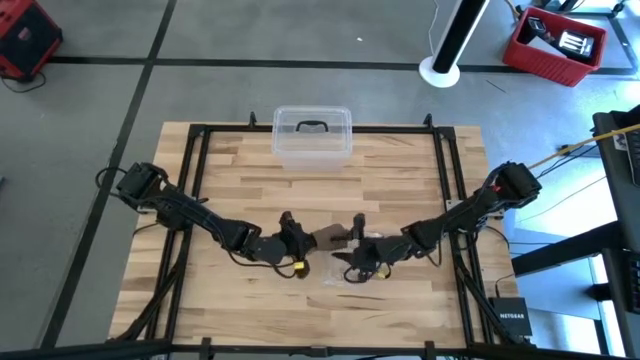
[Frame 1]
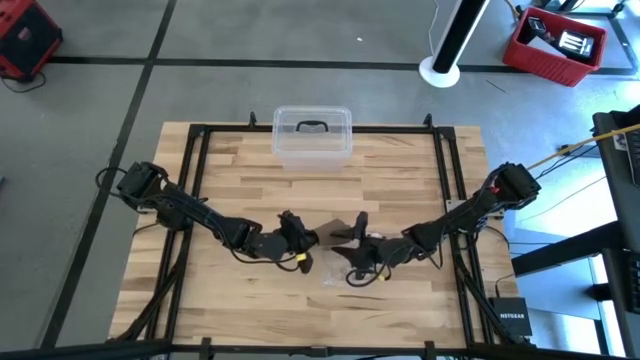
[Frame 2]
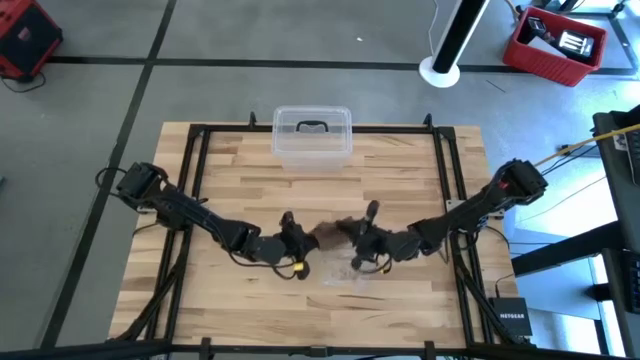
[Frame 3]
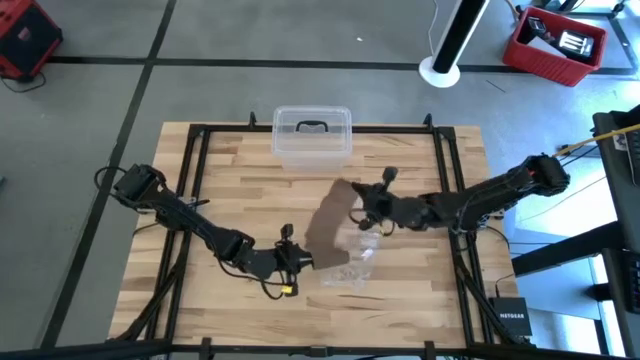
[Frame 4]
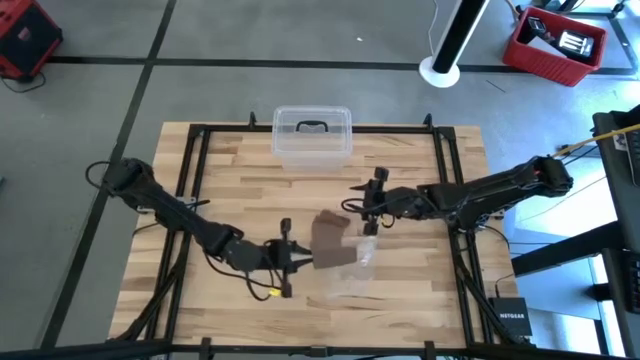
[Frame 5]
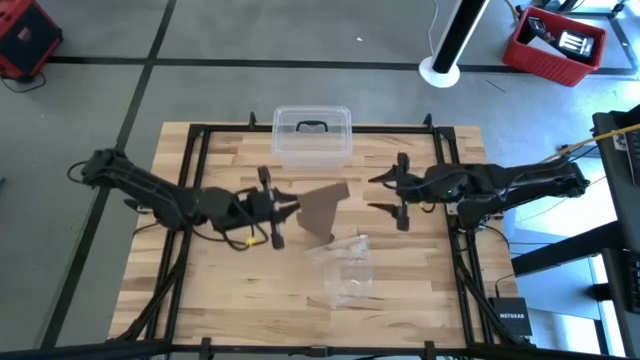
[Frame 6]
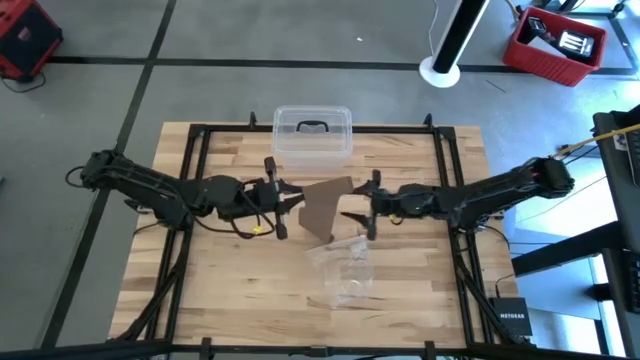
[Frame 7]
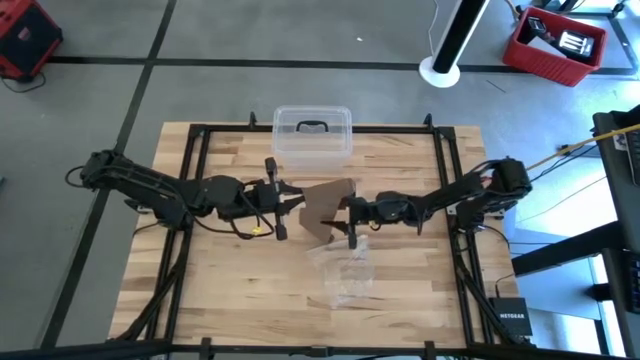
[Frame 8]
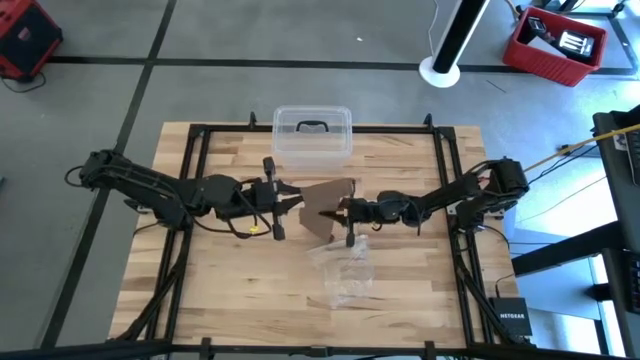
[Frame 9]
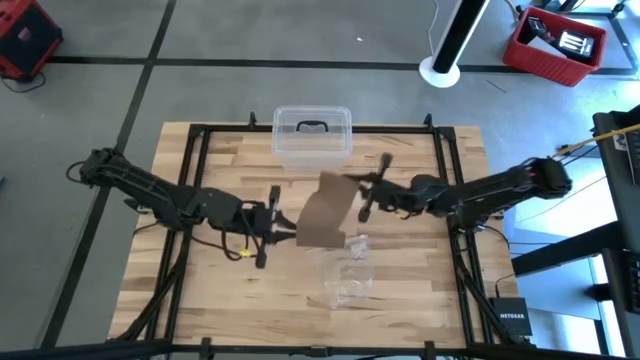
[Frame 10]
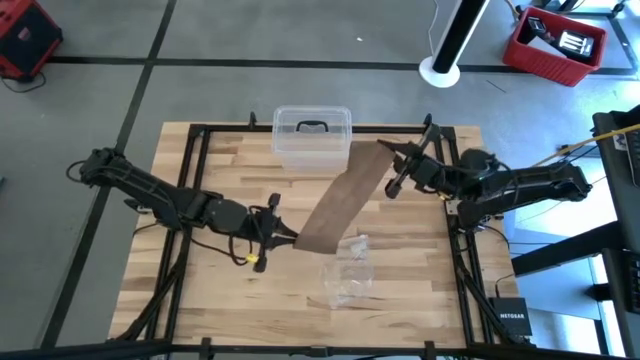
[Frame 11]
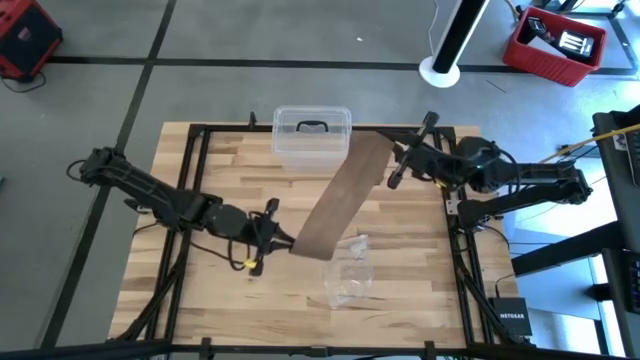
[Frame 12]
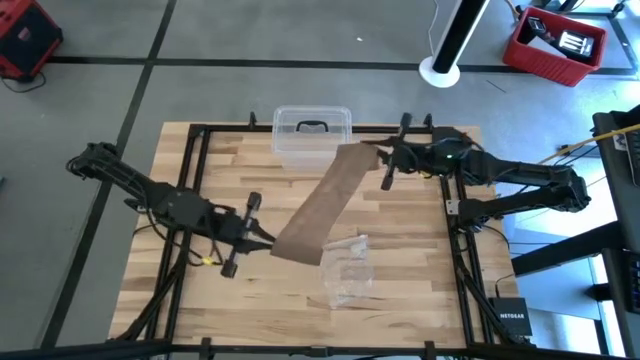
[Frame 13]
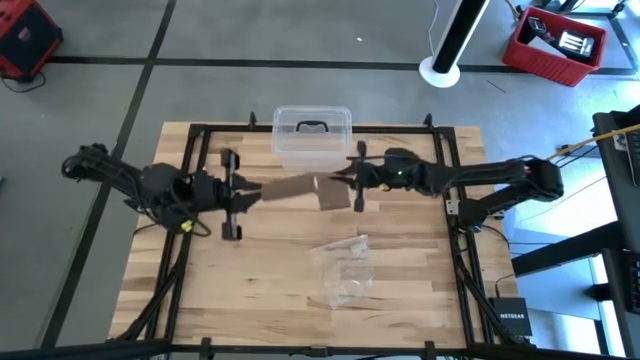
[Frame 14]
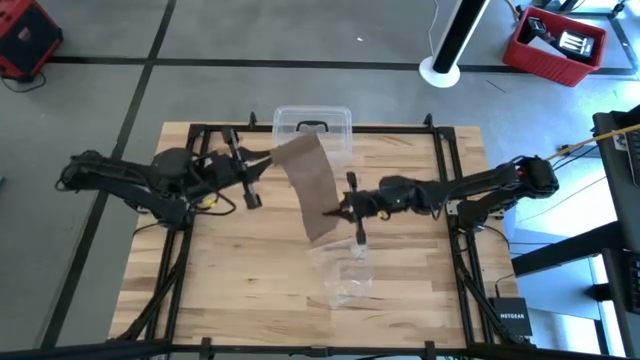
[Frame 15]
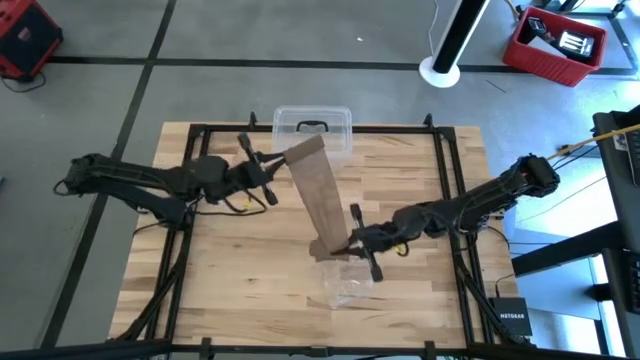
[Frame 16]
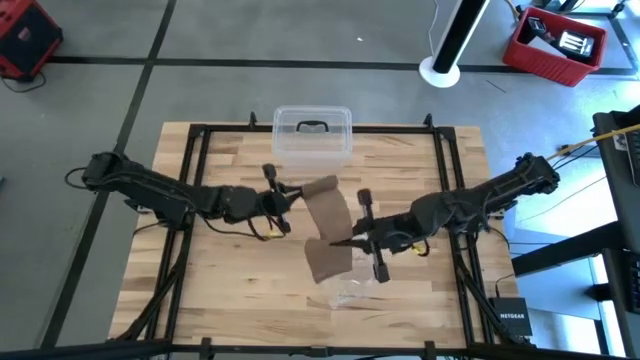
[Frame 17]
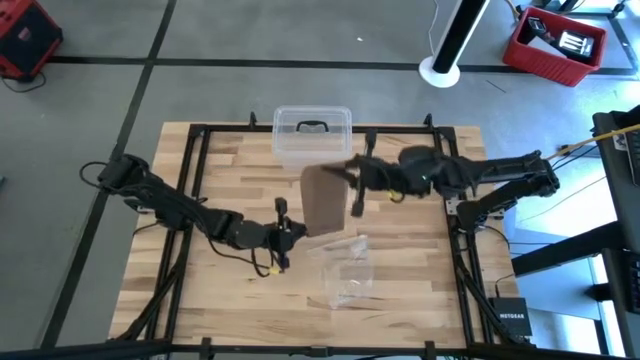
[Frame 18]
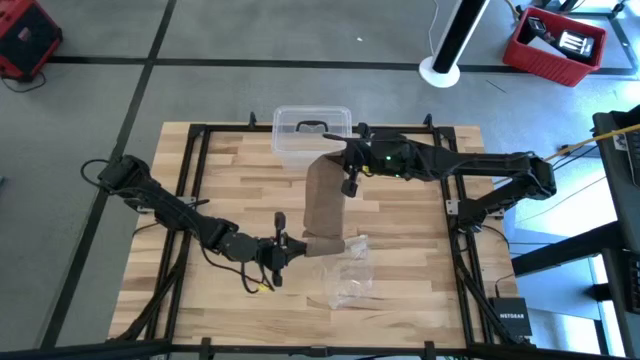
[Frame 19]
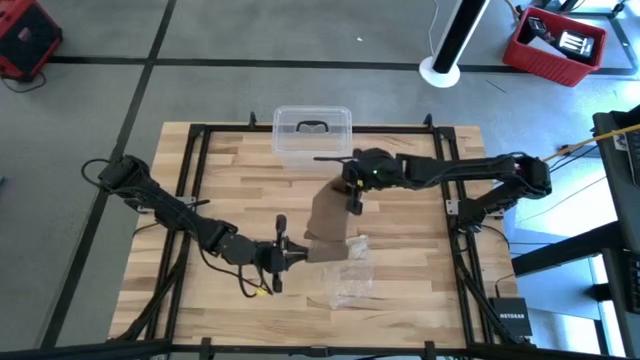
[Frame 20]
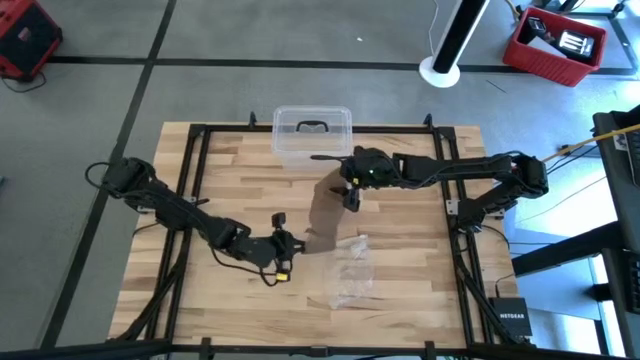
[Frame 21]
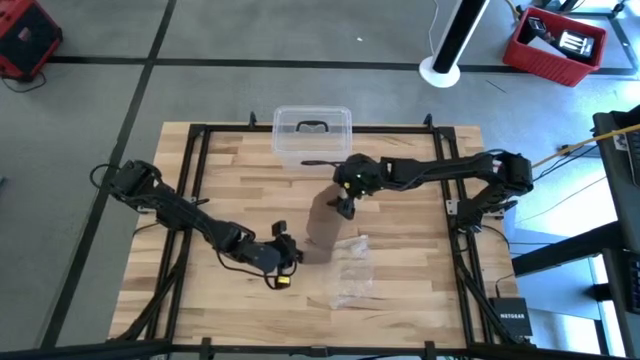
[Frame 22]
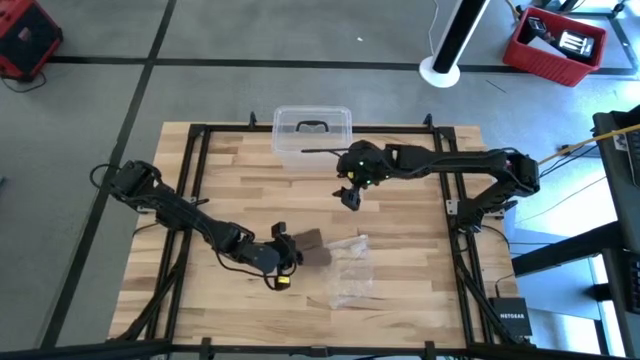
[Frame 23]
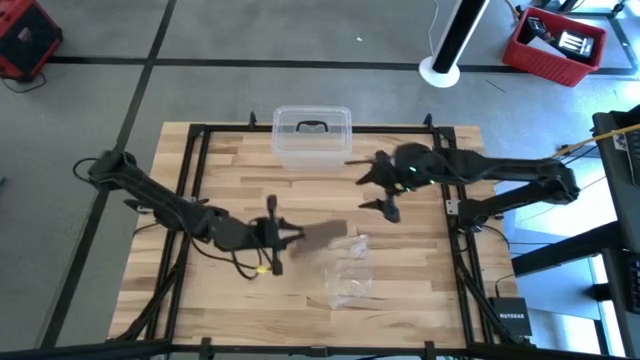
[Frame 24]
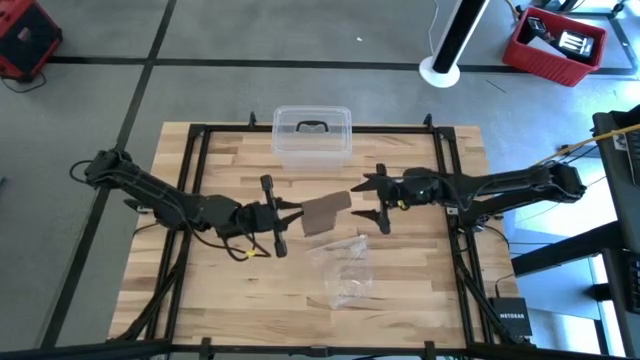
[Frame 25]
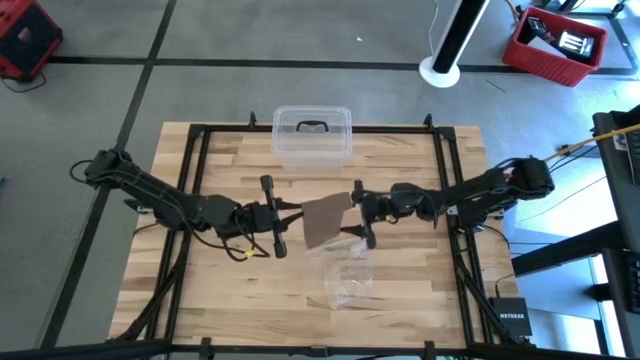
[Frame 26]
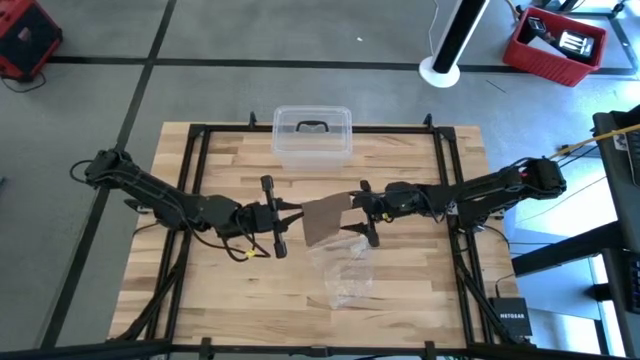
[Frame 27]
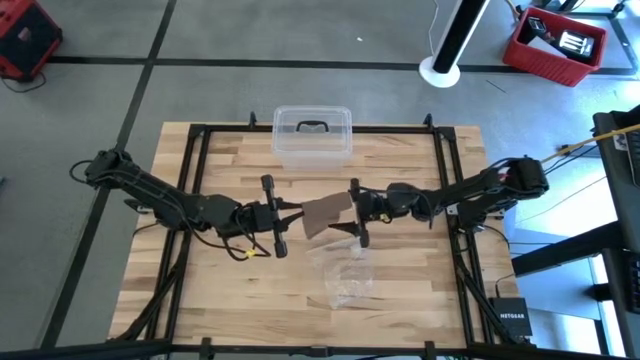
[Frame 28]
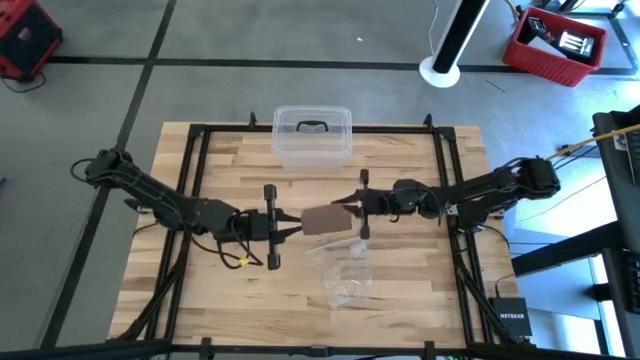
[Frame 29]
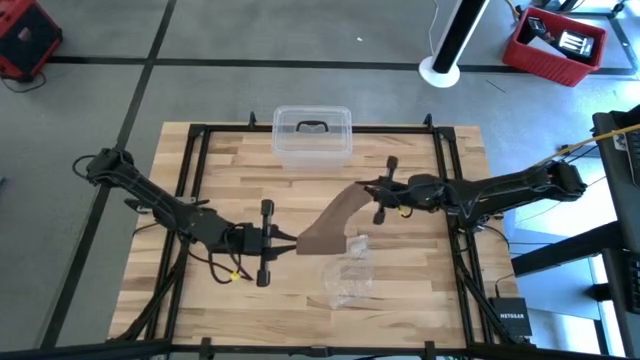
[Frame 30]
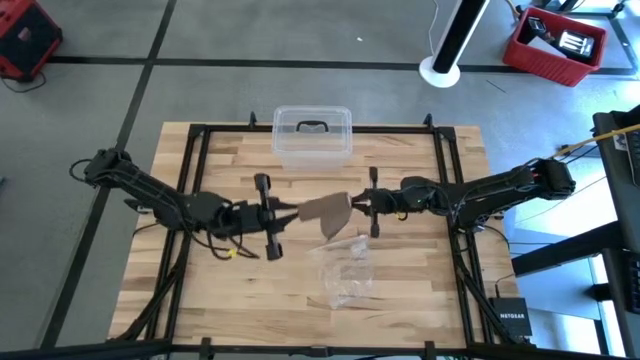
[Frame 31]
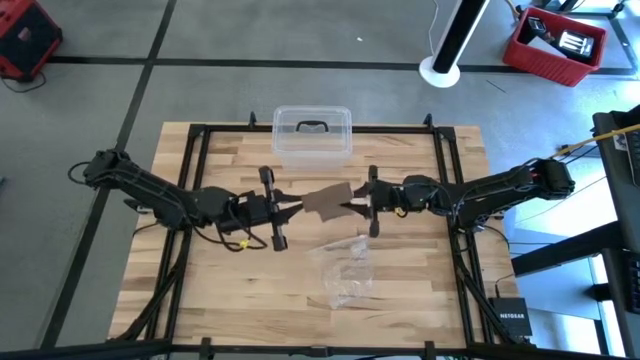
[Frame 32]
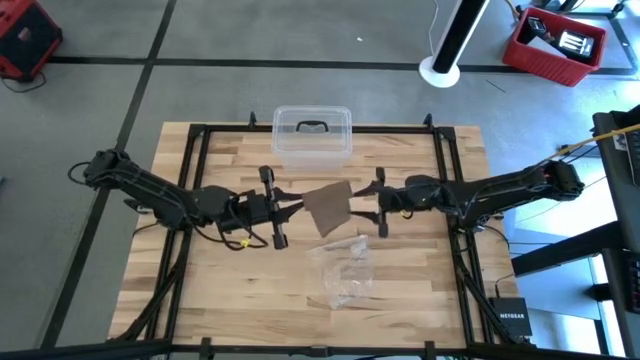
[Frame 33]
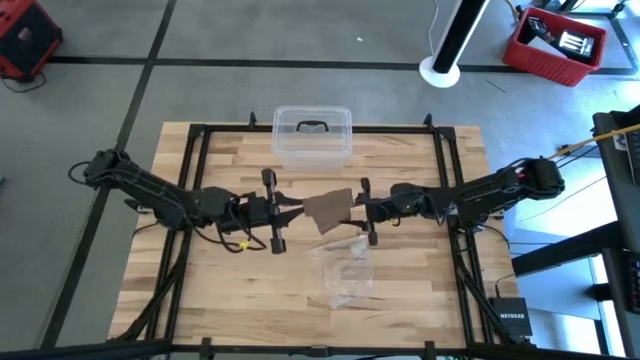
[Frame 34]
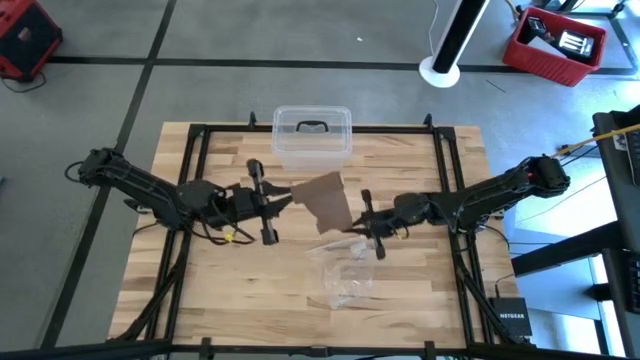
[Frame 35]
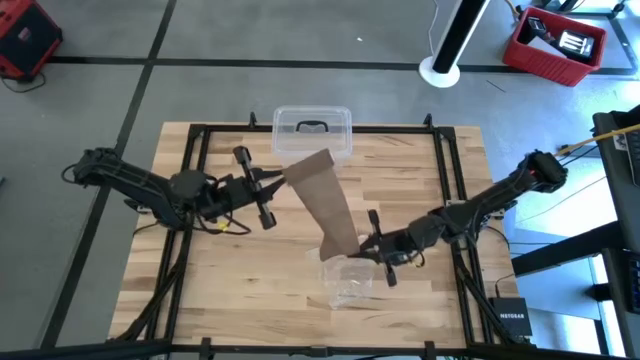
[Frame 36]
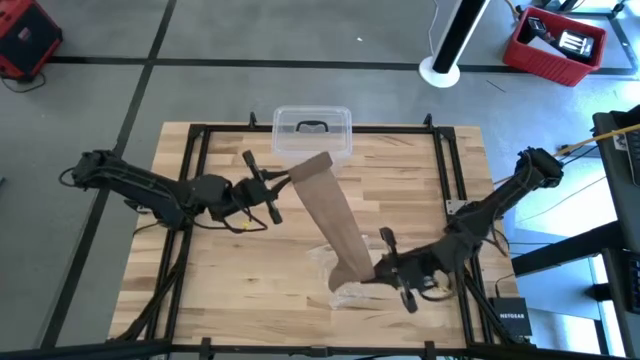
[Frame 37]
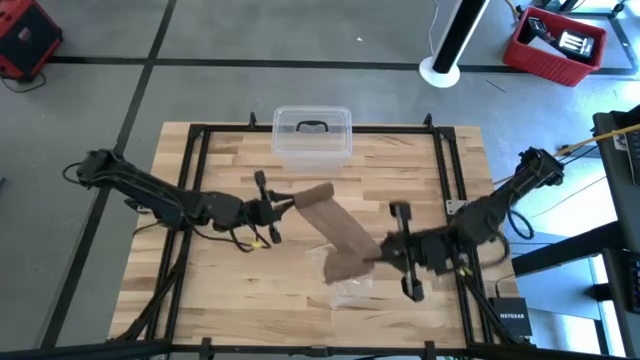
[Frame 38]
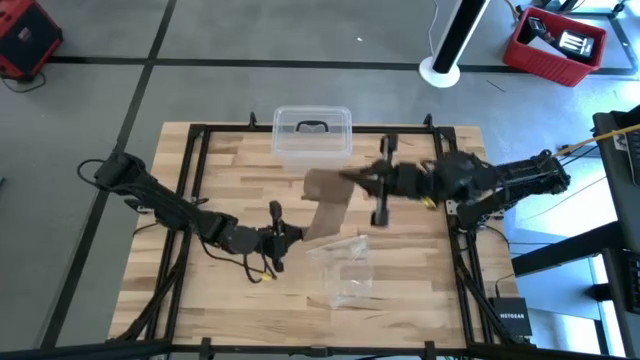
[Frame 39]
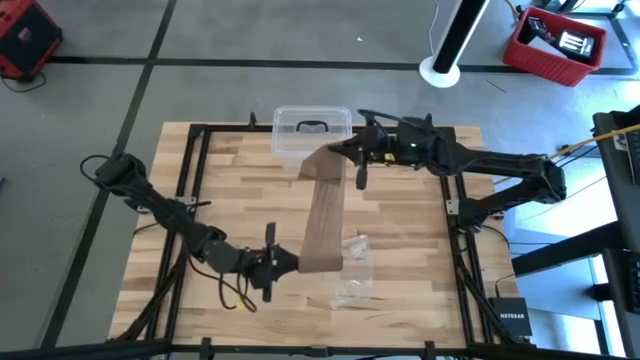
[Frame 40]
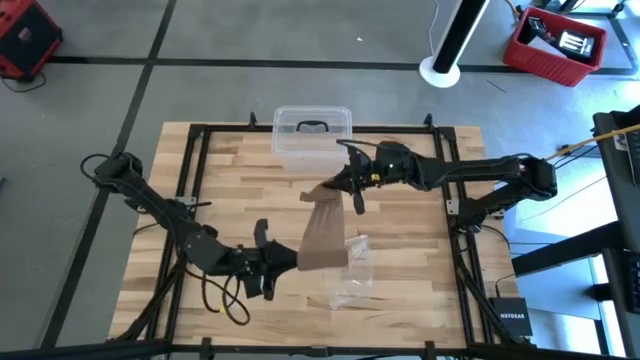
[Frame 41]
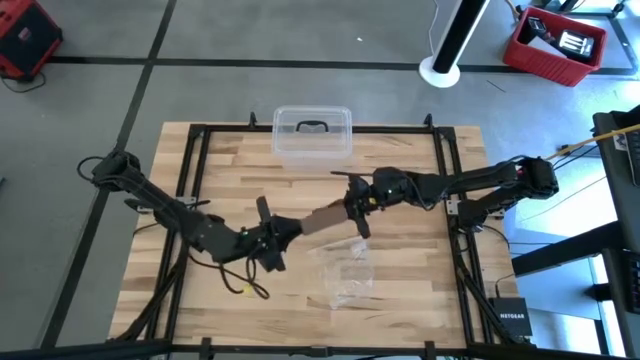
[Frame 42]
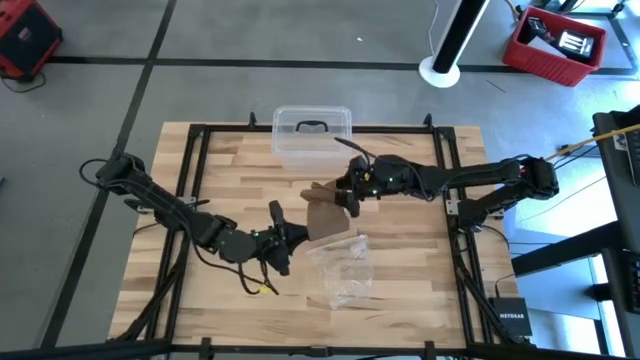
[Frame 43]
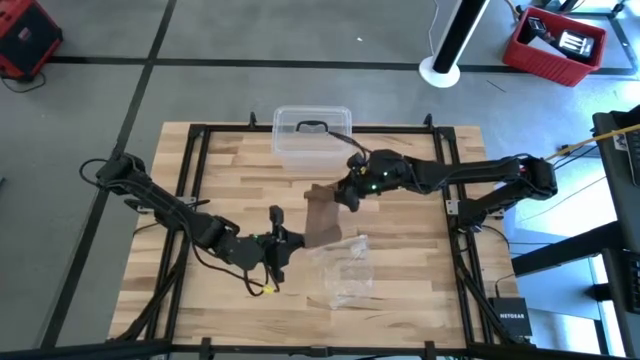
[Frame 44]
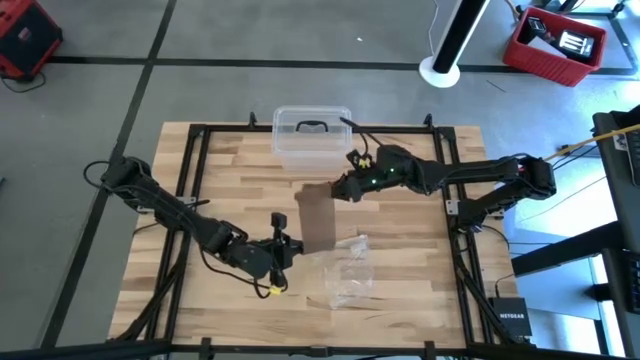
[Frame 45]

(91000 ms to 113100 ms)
Task: Roll bandage
Roll the brown bandage
